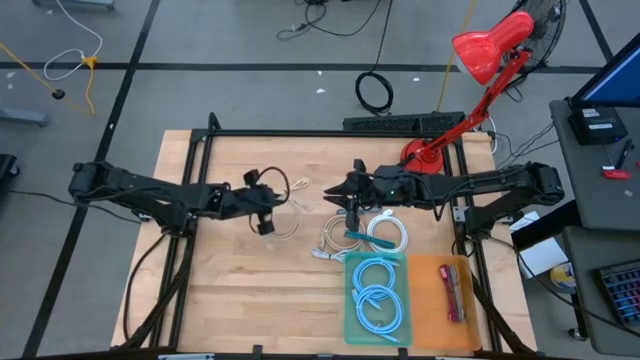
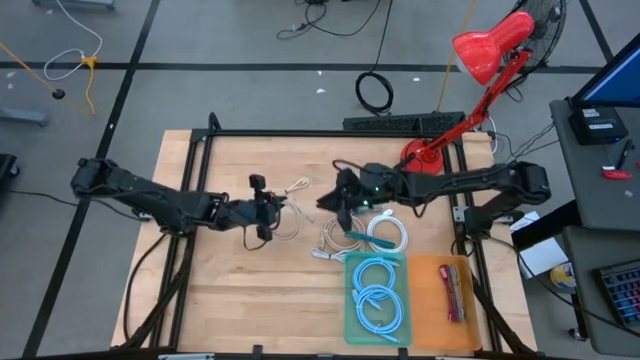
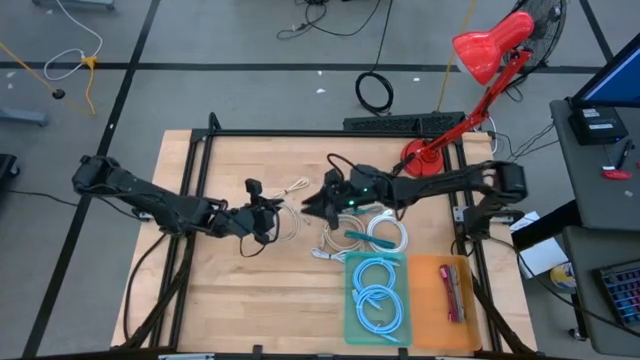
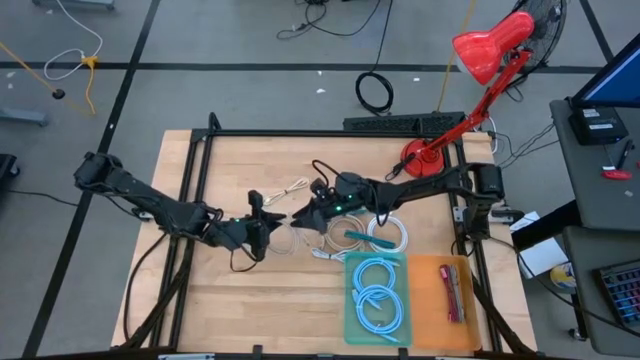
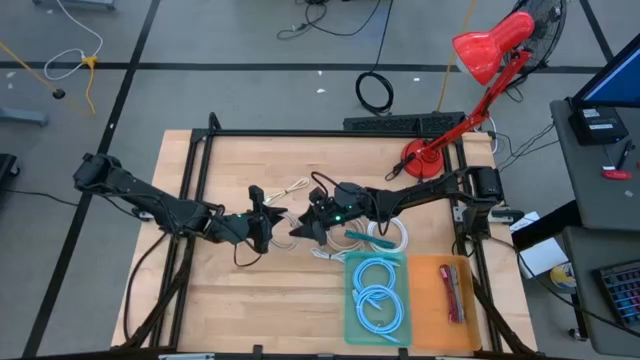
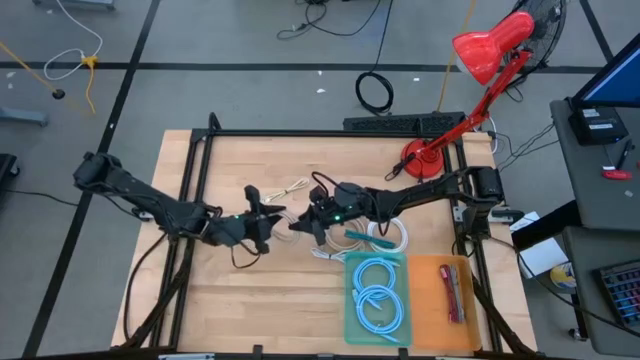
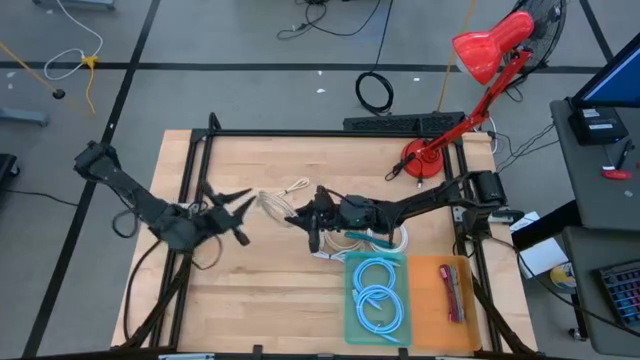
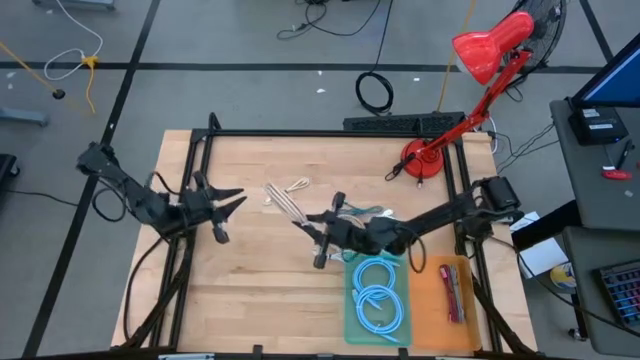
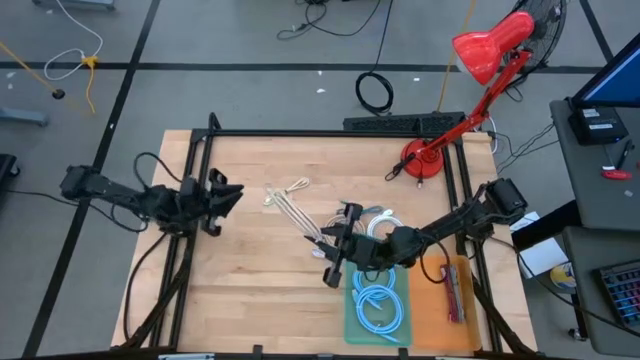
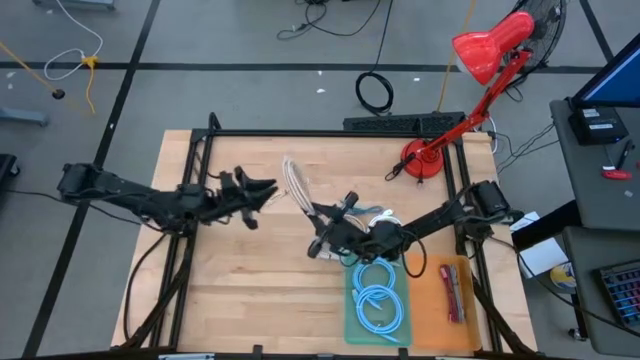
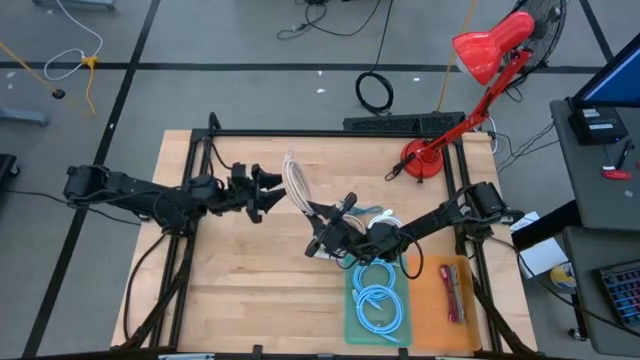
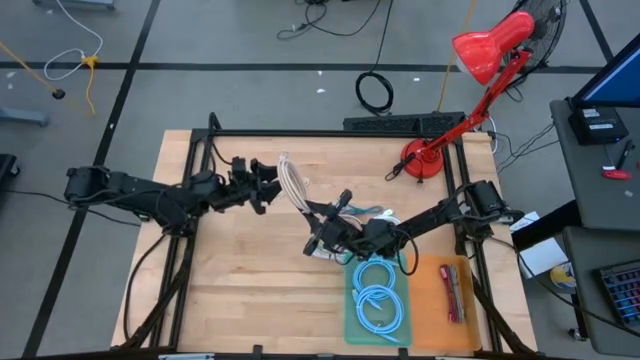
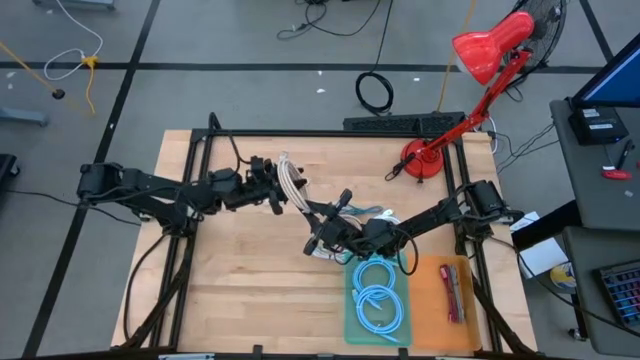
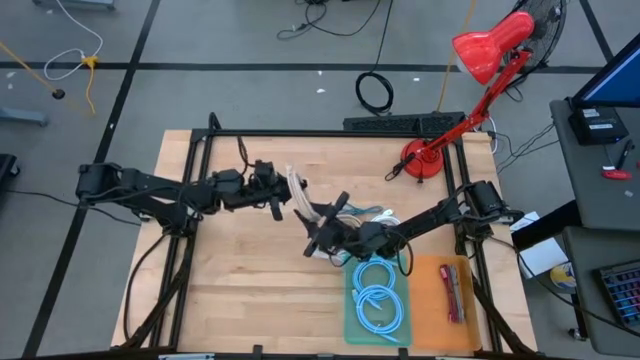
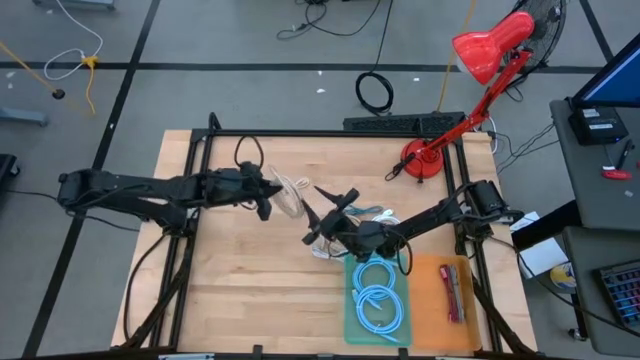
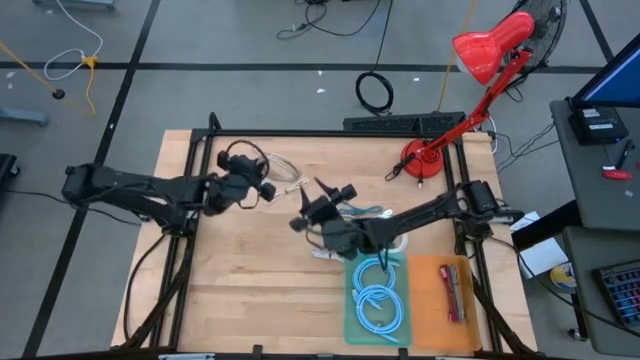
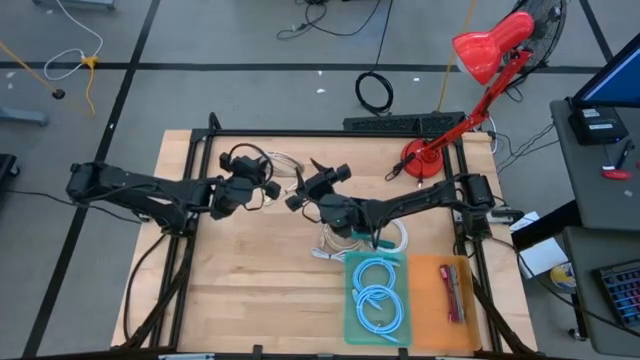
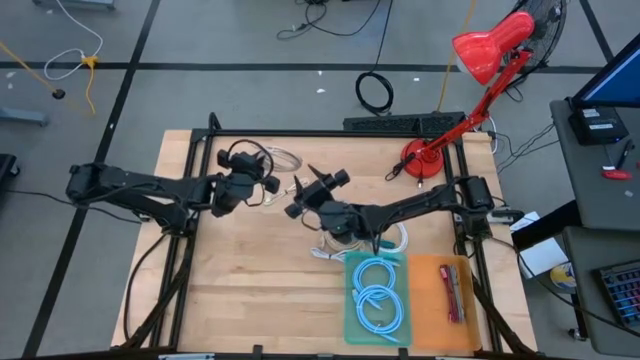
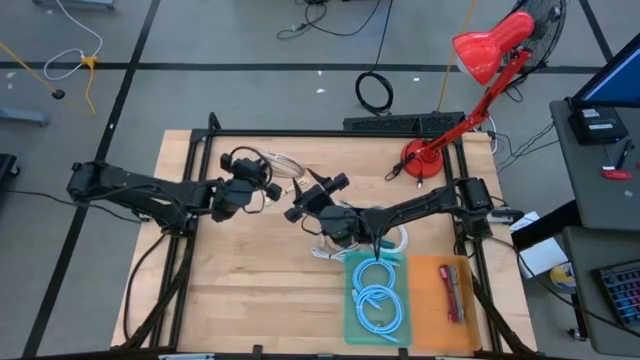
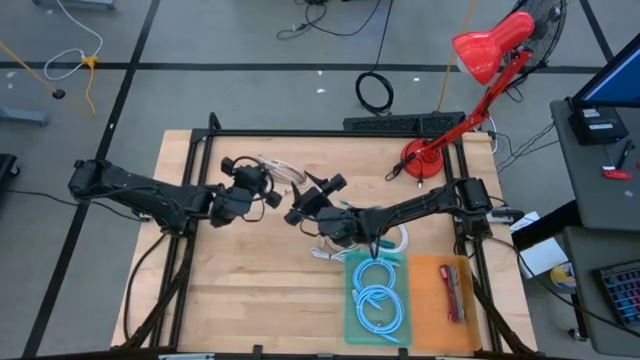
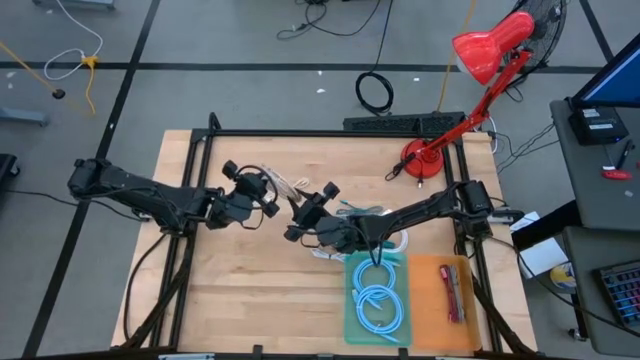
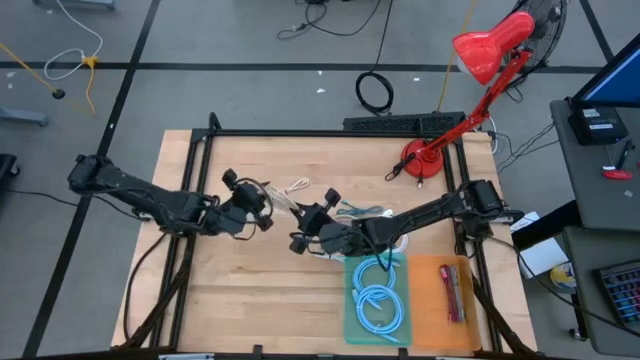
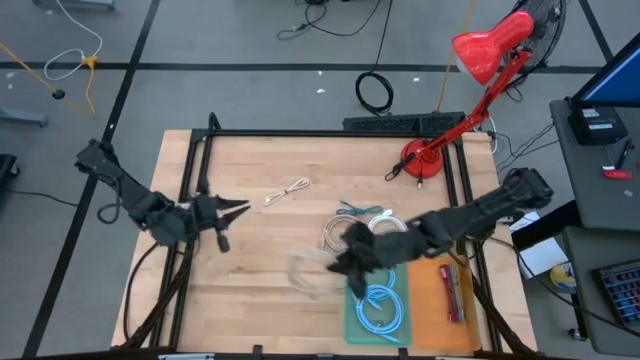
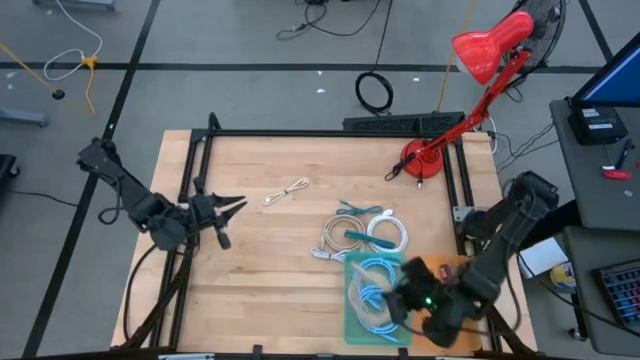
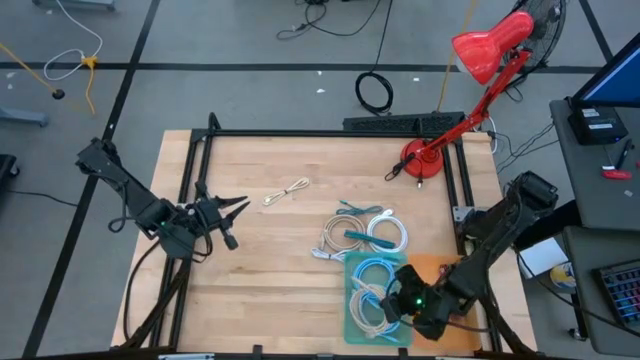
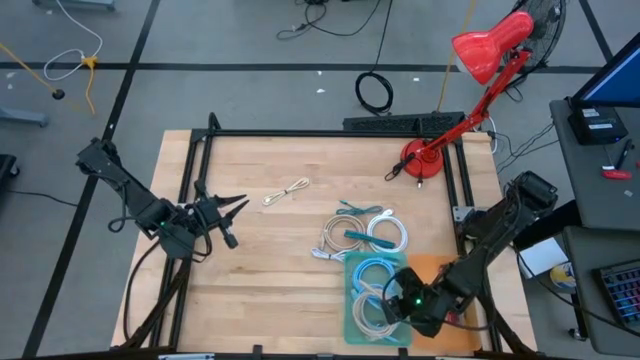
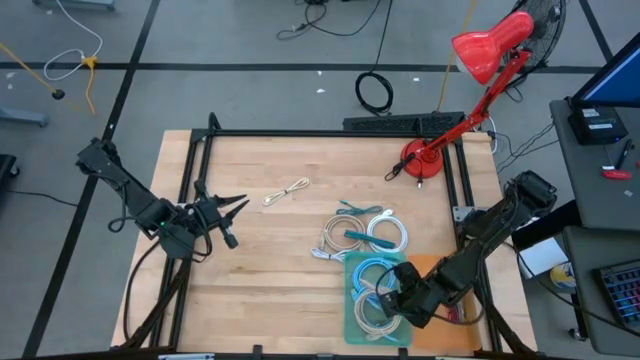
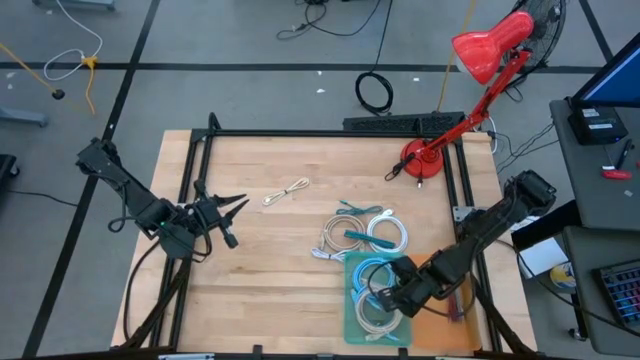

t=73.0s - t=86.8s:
Task: Pick & Place USB Port
Put the brown charger cable into the blue bin

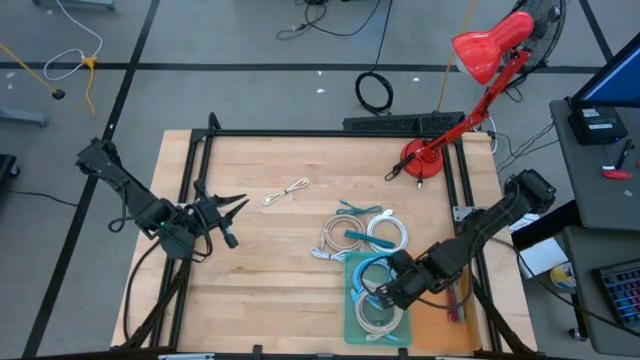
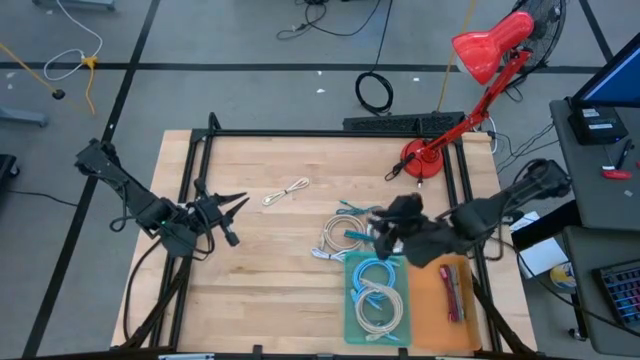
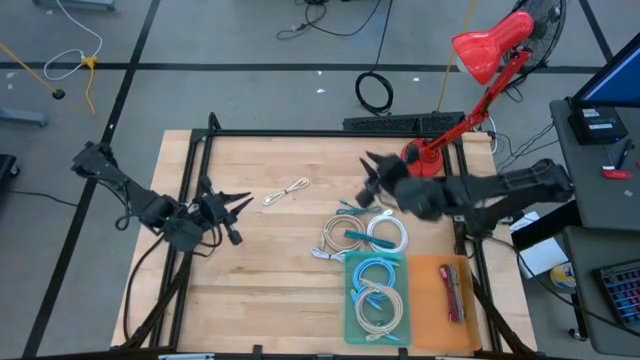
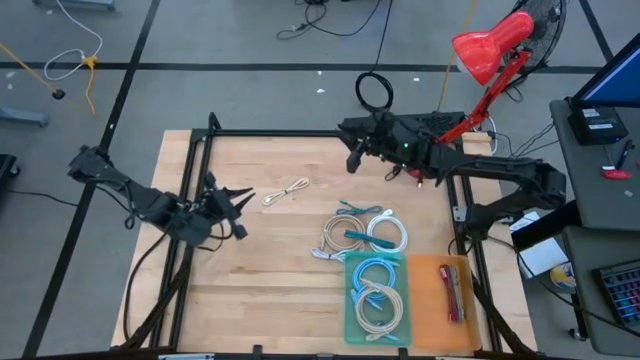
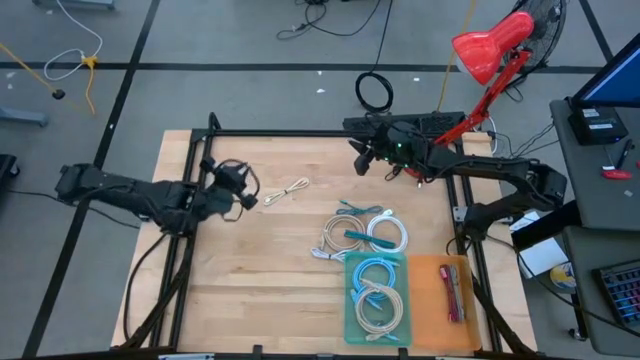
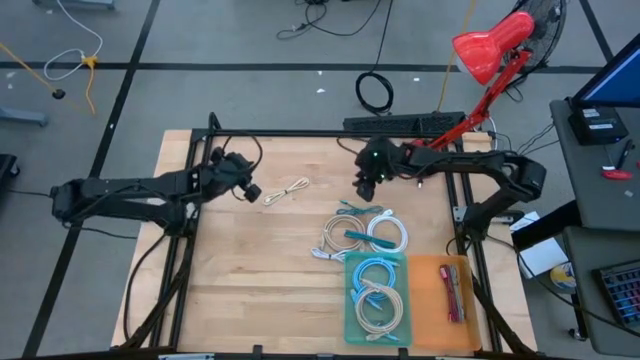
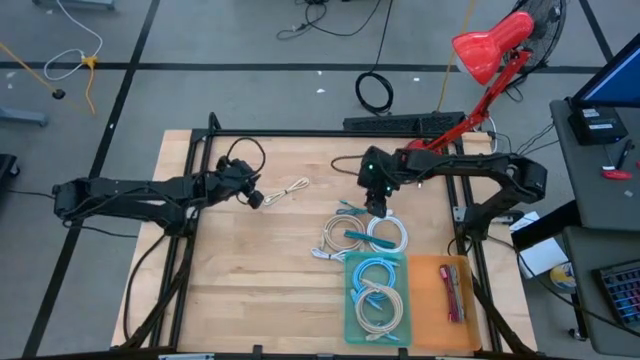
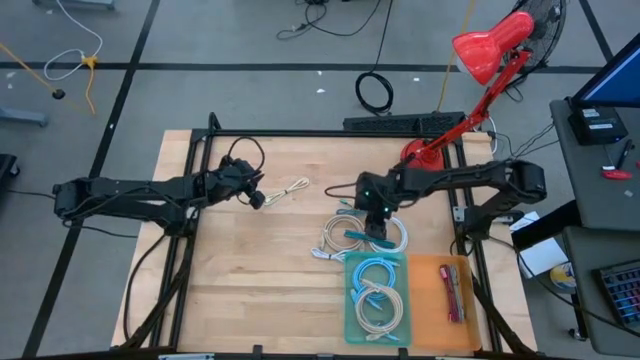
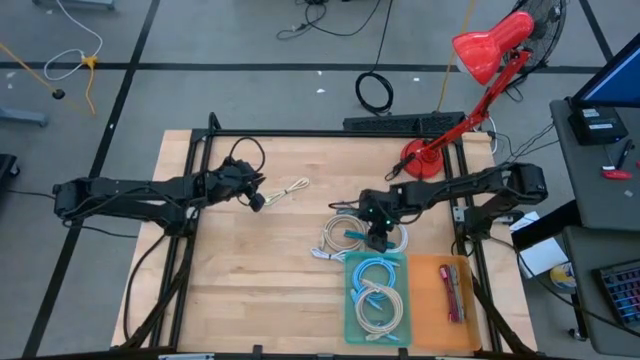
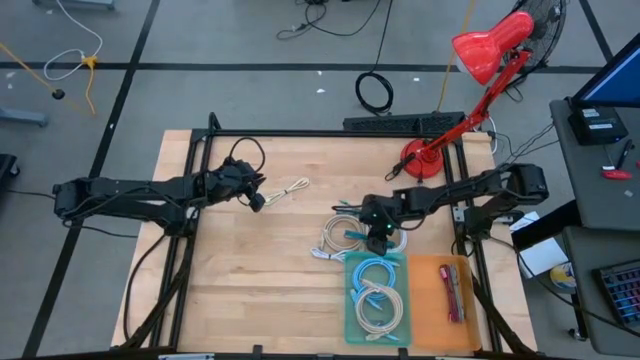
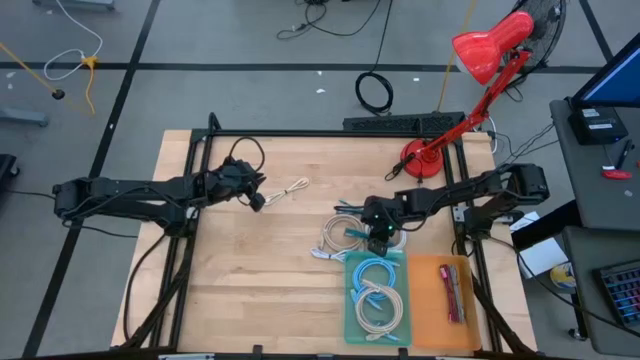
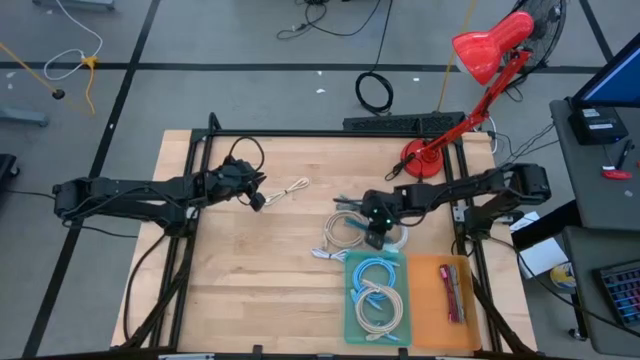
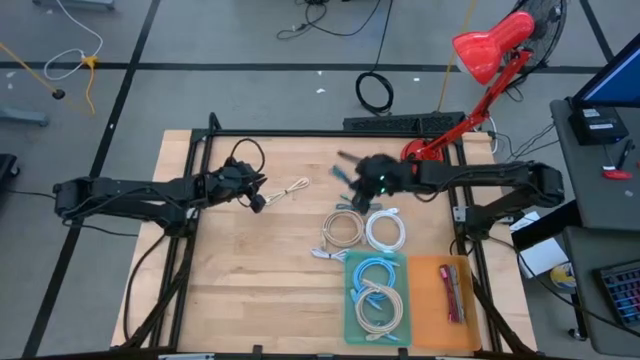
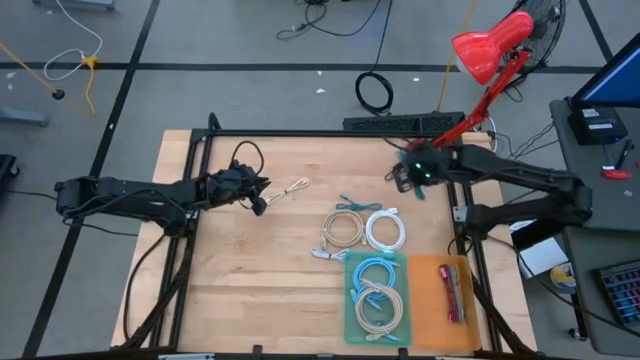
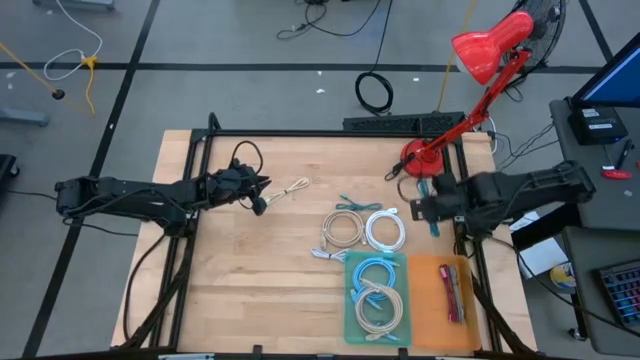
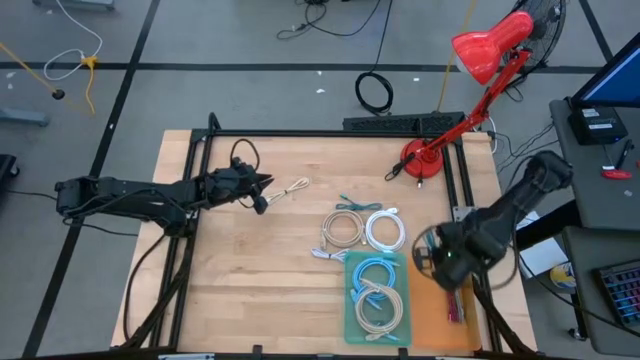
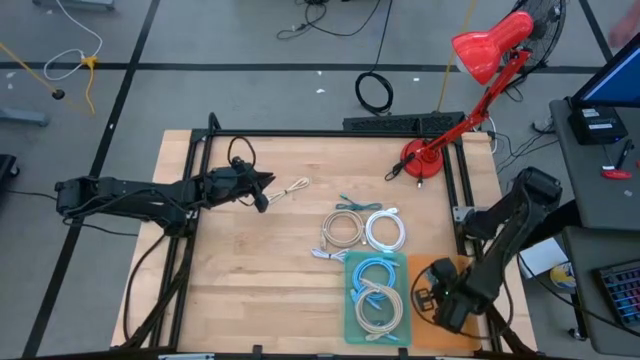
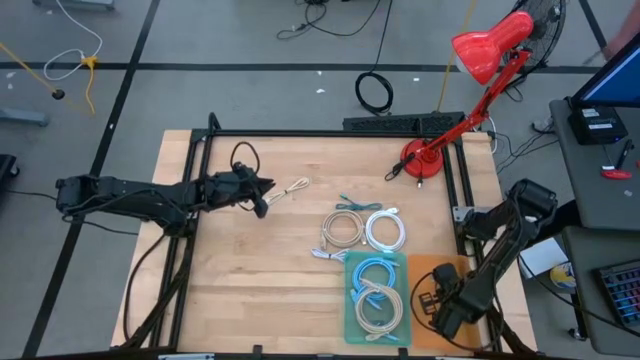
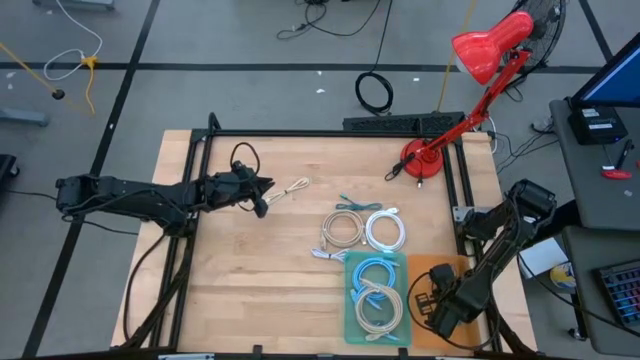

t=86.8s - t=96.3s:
Put the blue charger cable into the orange bin
